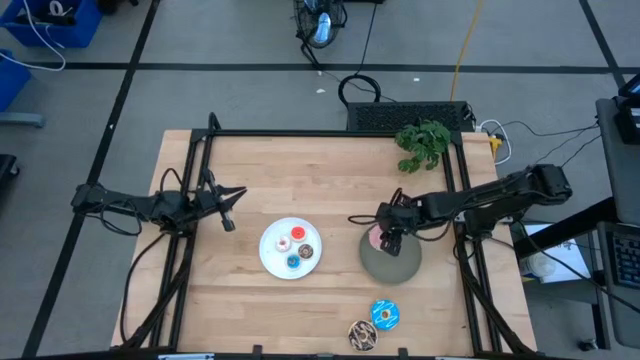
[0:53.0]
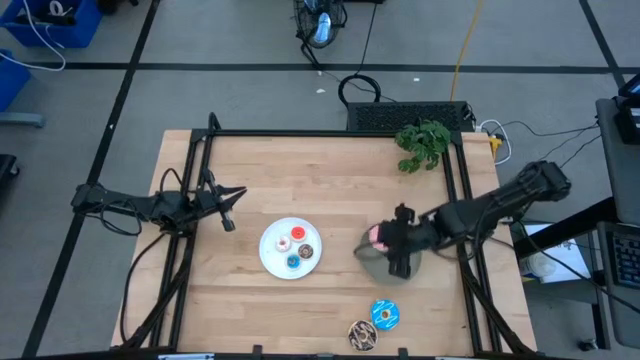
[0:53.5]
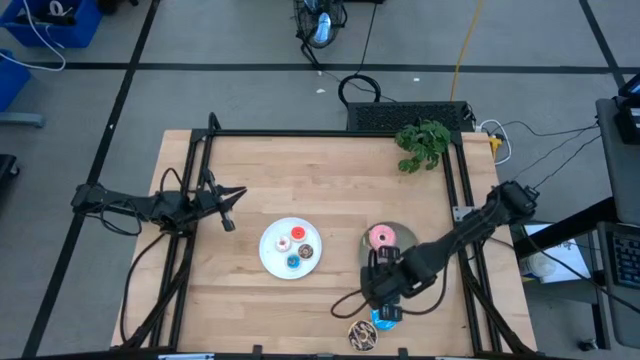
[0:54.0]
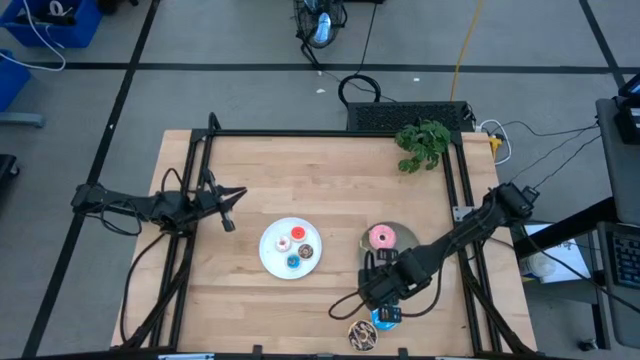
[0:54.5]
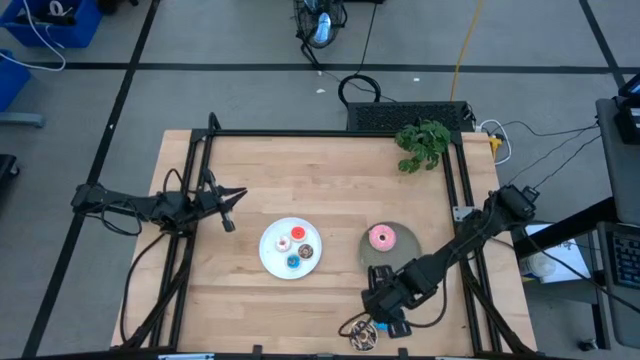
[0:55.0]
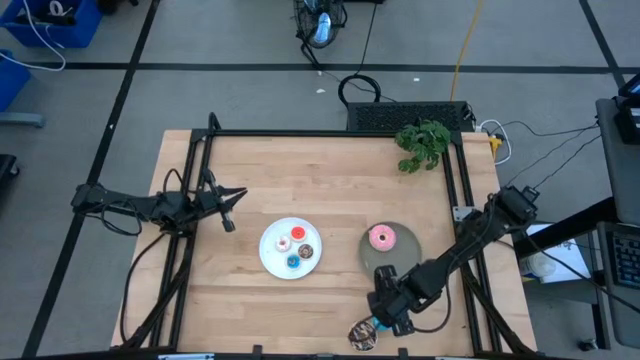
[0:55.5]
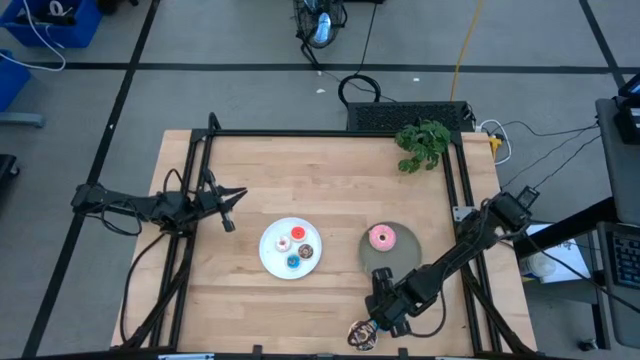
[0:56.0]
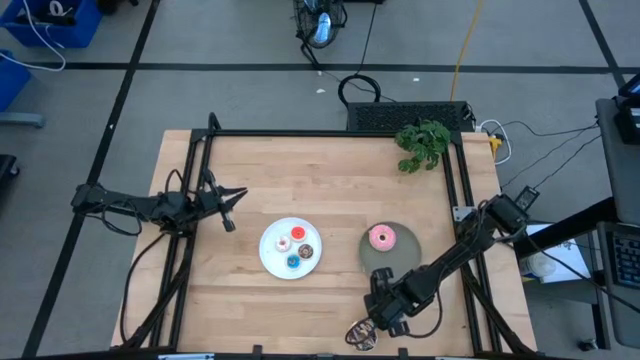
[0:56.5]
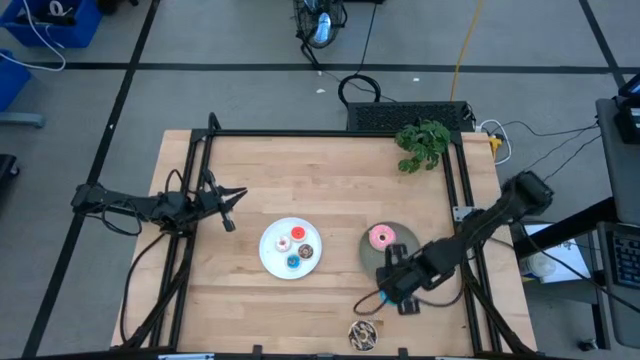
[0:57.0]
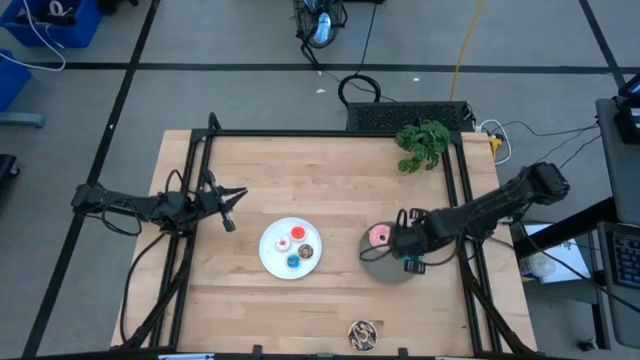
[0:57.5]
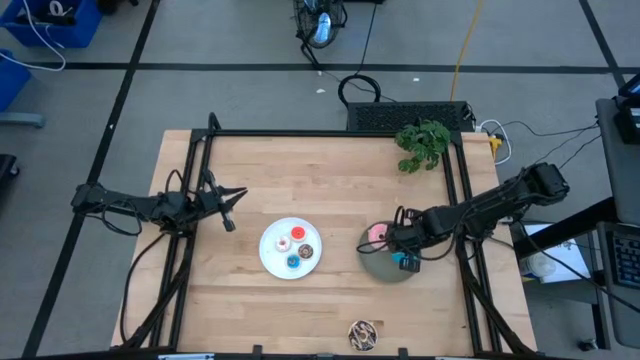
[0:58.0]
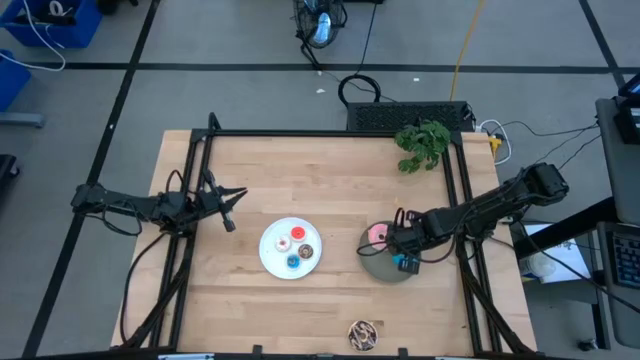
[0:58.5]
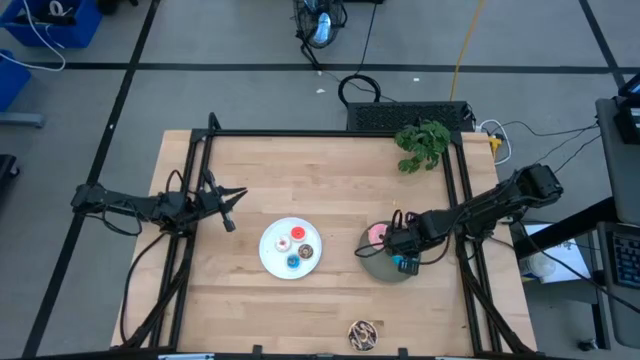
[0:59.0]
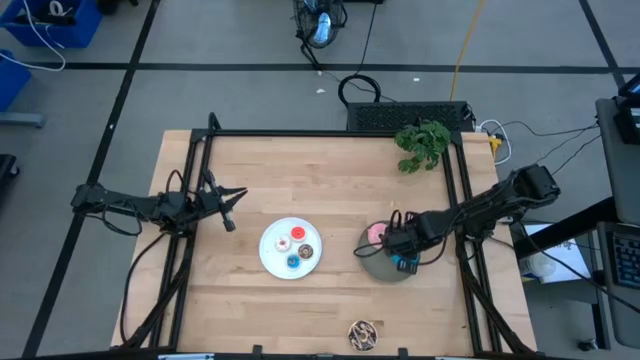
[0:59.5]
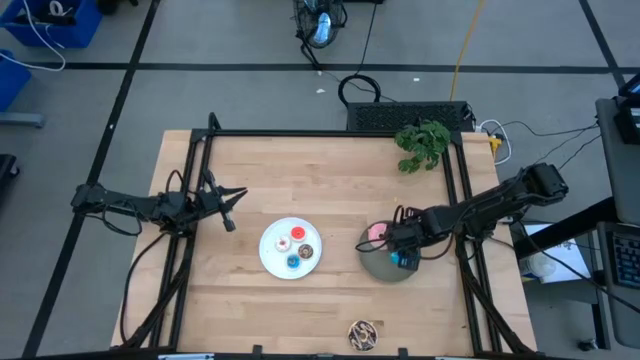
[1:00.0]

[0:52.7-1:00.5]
Task: Pick & Place donuts
Put the large blue doughnut on the gray plate

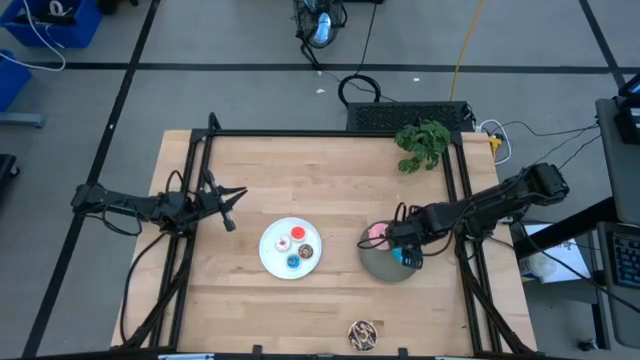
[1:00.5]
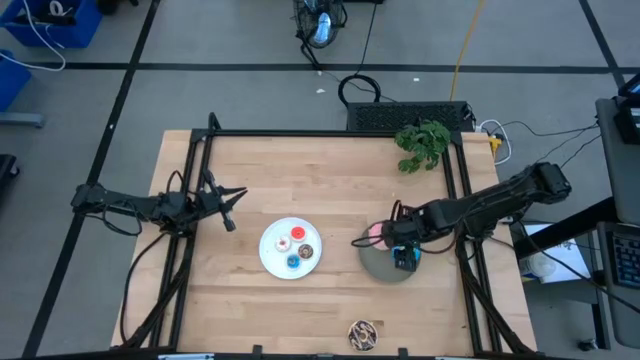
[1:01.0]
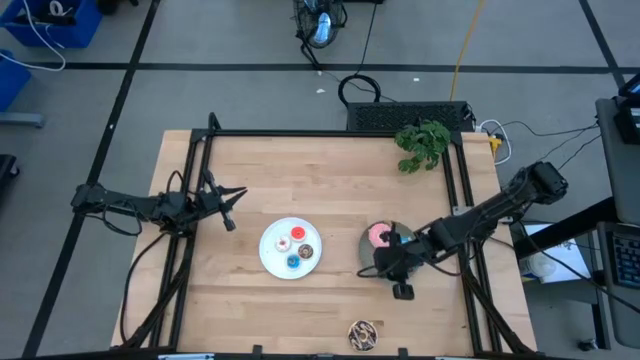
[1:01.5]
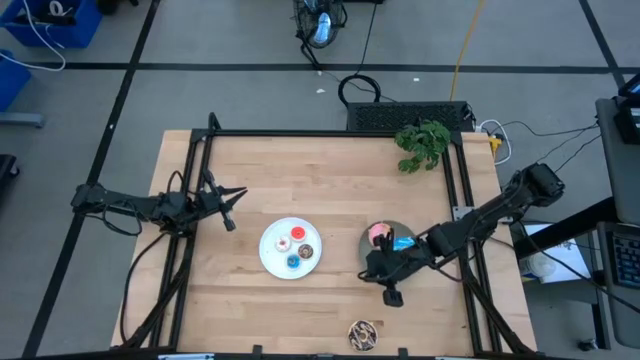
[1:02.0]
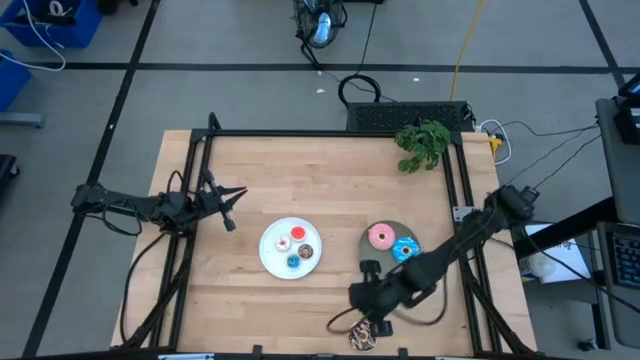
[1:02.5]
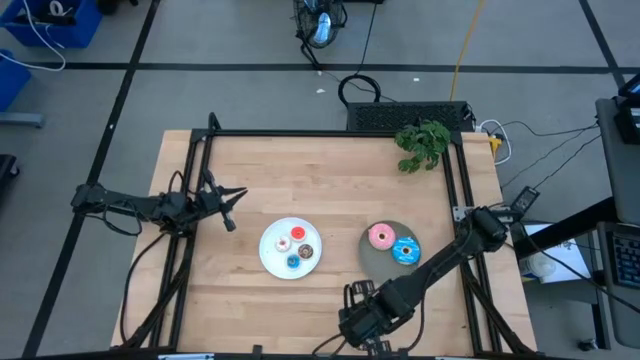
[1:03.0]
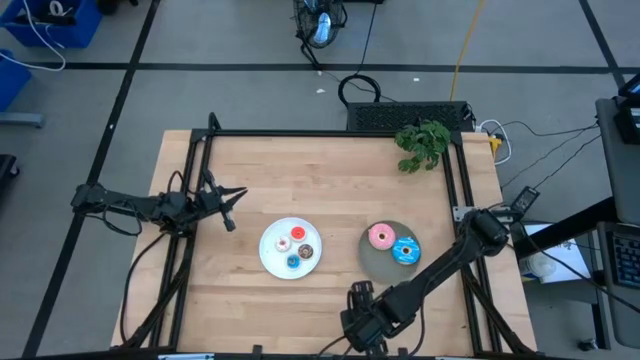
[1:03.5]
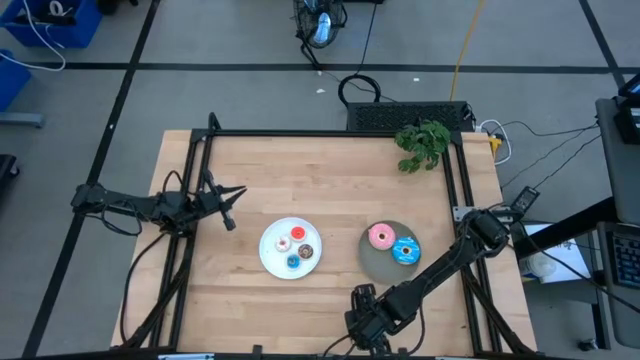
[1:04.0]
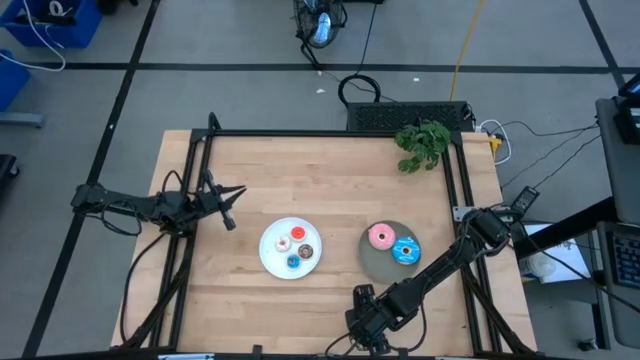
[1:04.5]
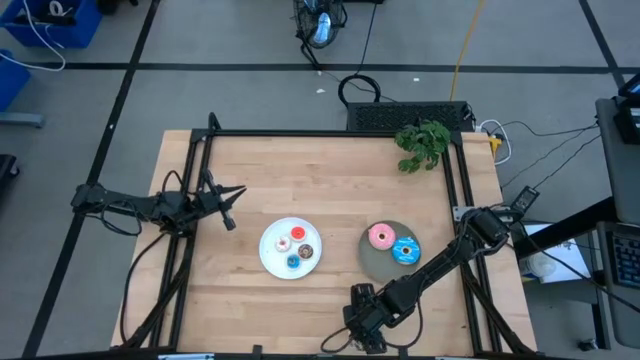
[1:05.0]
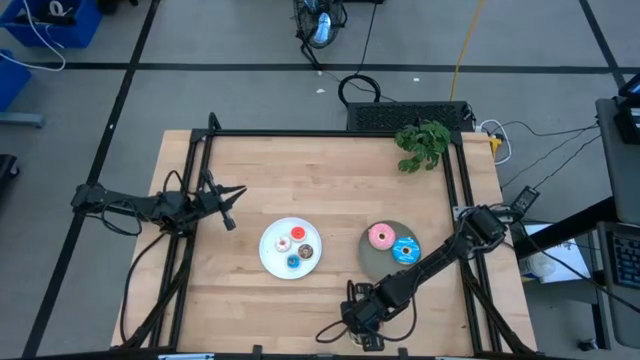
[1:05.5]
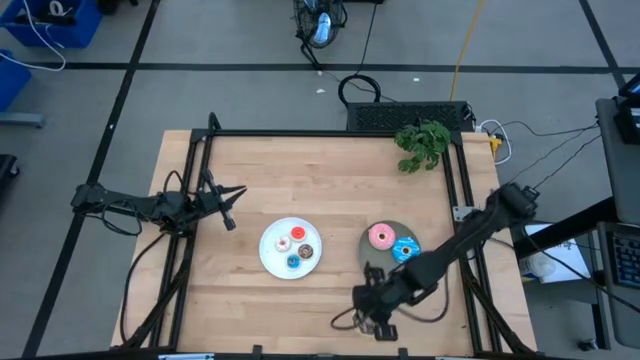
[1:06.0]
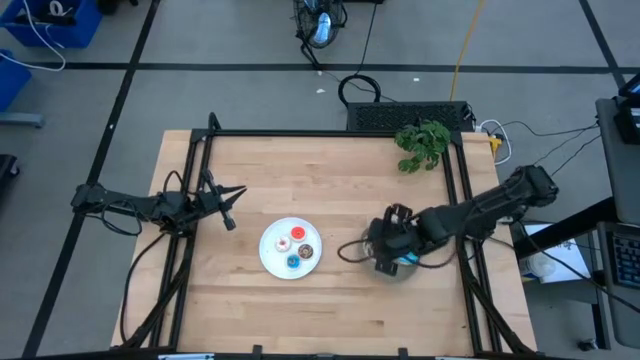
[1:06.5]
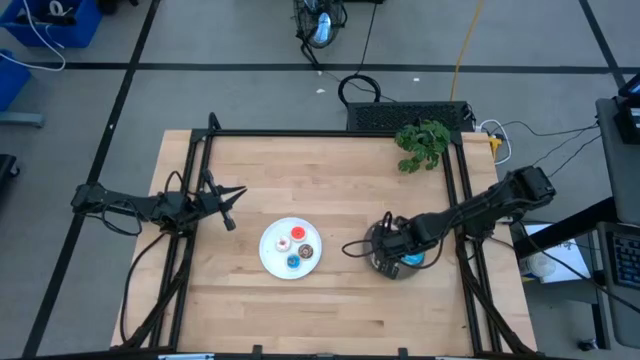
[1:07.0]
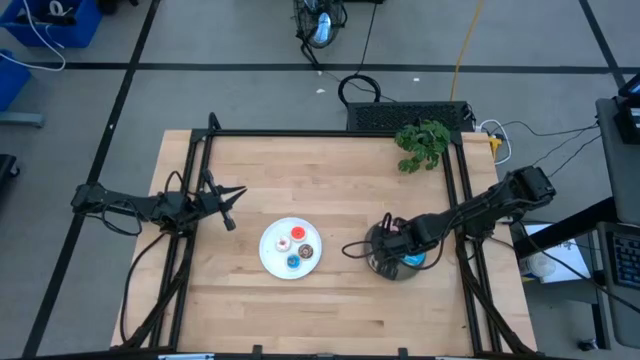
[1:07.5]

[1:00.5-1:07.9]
Put the large black doughnut on the gray plate

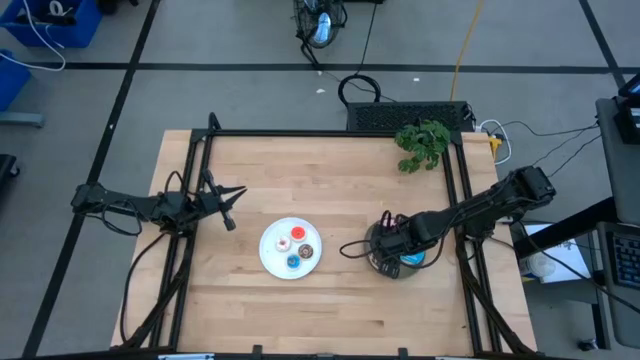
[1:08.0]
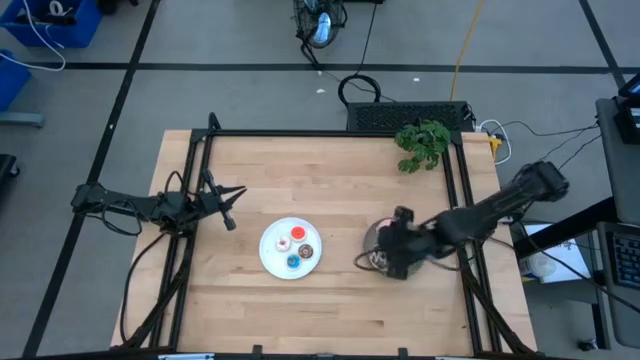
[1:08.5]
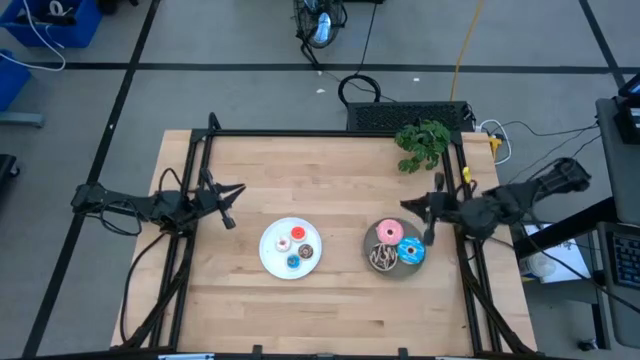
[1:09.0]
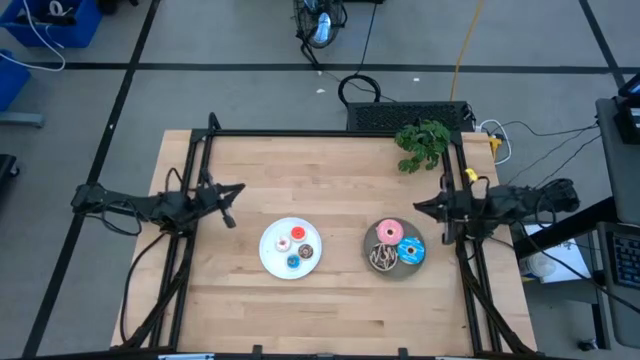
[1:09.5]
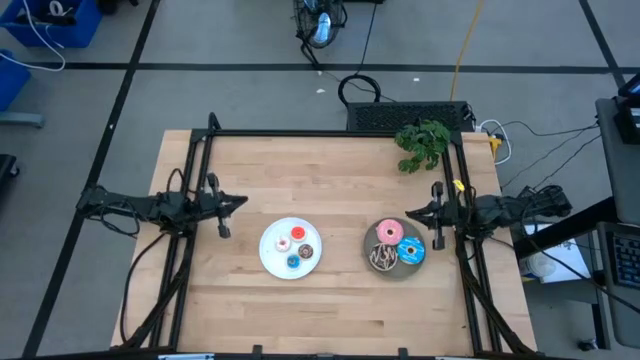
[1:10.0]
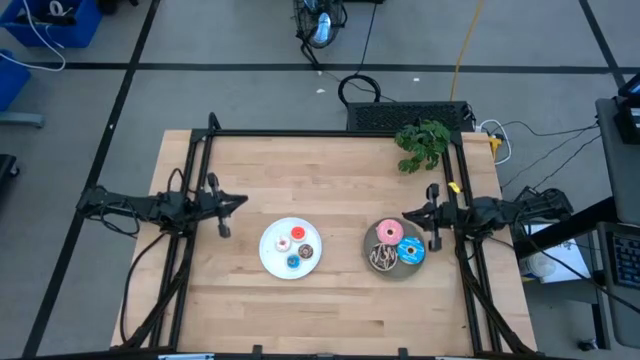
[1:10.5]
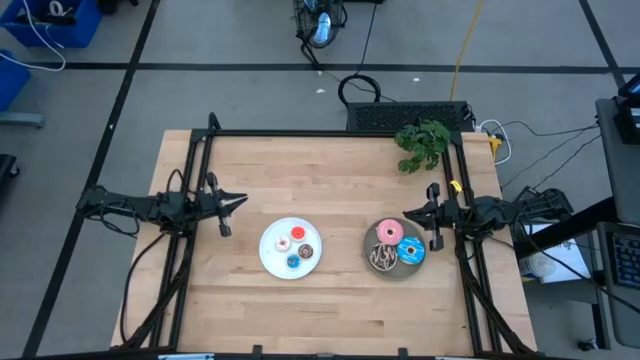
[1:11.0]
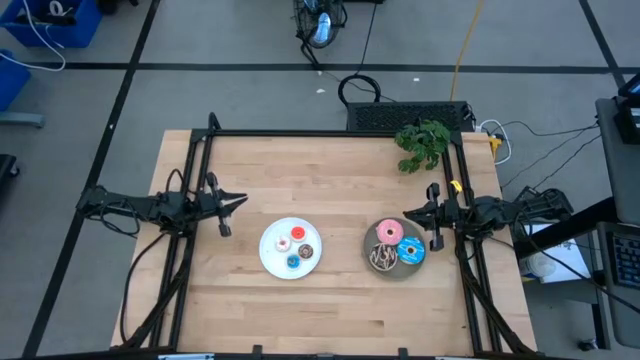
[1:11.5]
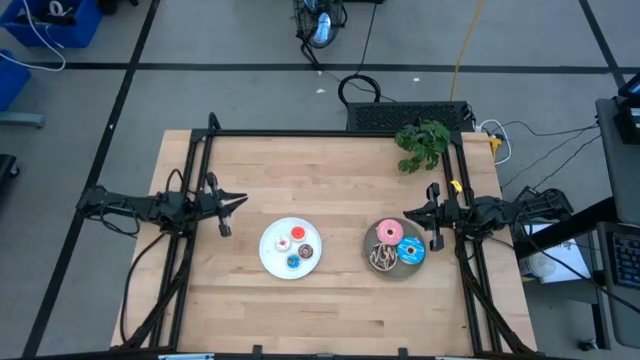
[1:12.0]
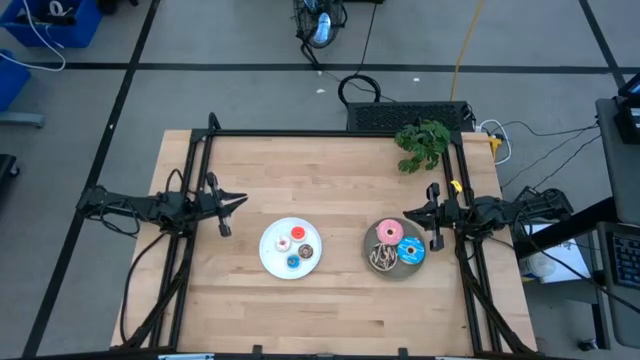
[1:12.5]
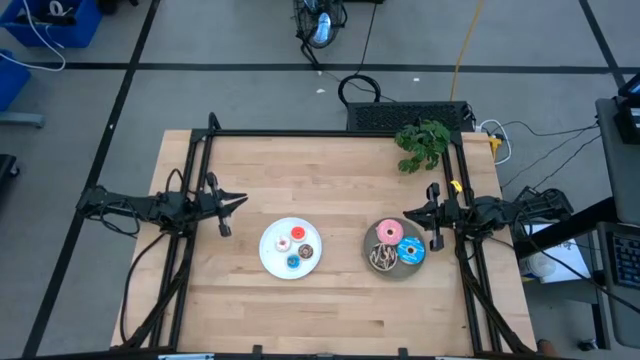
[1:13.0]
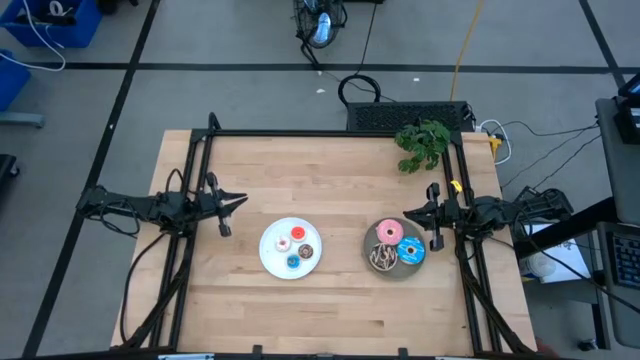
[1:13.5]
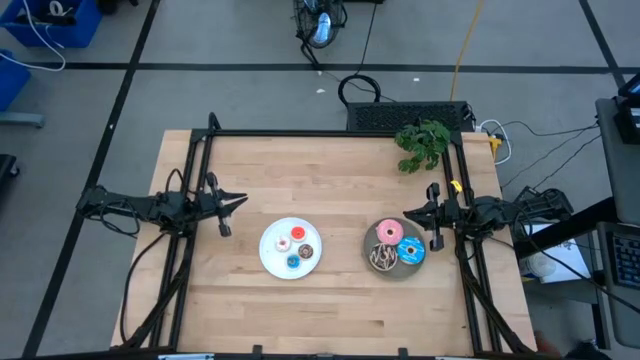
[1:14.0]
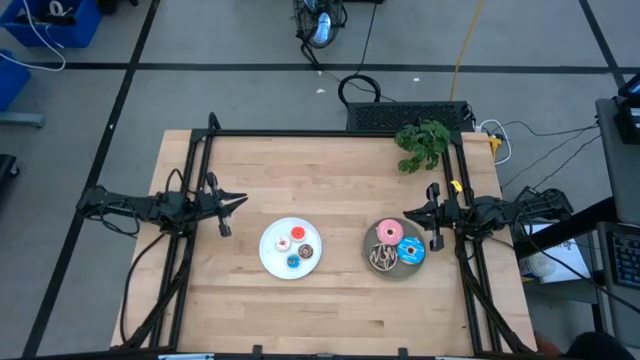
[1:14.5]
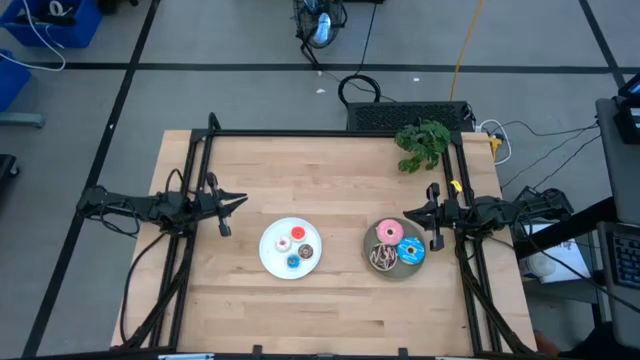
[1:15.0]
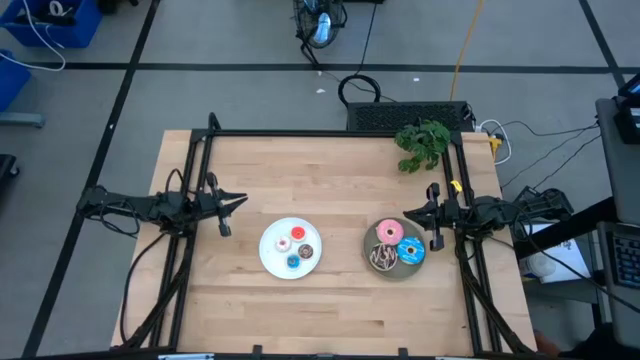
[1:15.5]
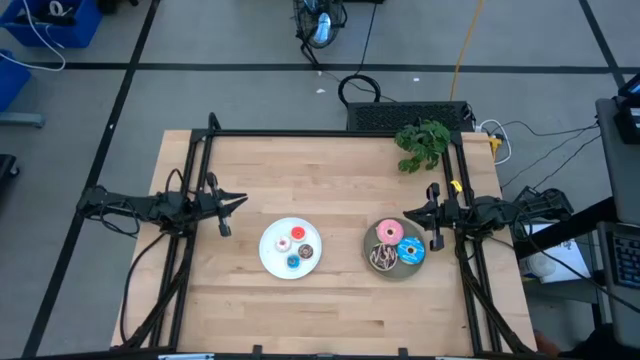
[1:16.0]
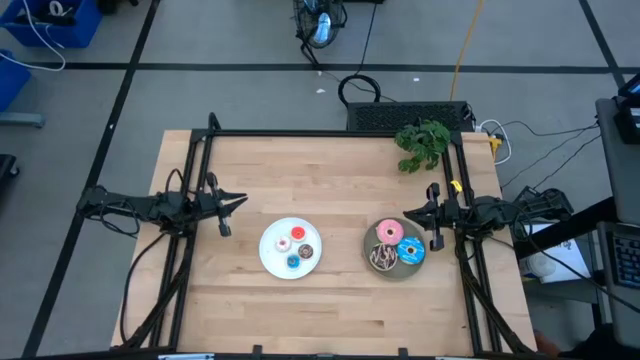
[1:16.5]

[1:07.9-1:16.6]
Return to Home Position
